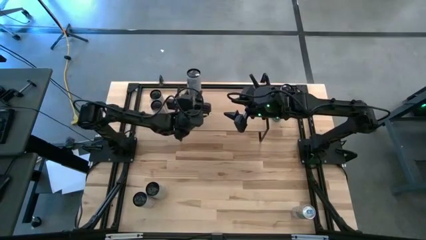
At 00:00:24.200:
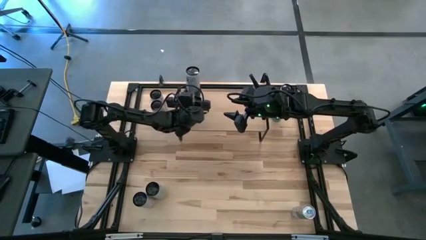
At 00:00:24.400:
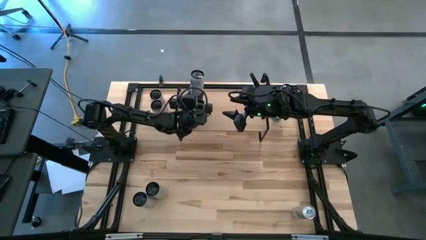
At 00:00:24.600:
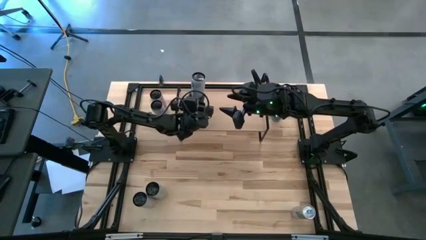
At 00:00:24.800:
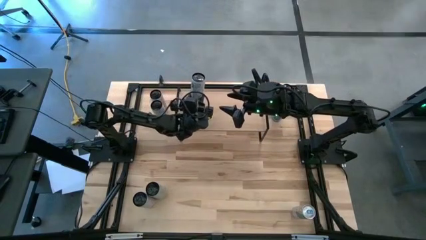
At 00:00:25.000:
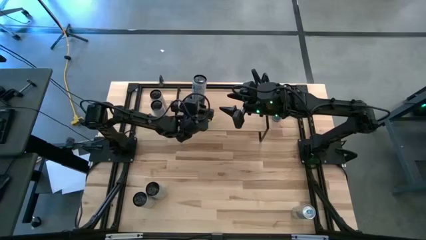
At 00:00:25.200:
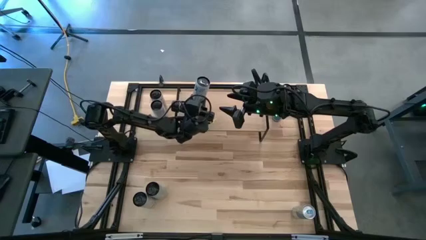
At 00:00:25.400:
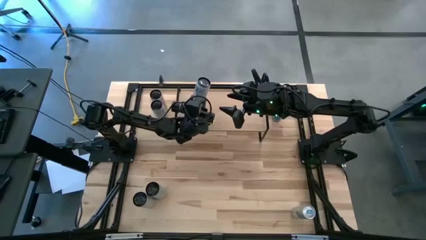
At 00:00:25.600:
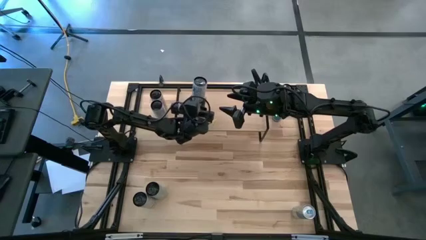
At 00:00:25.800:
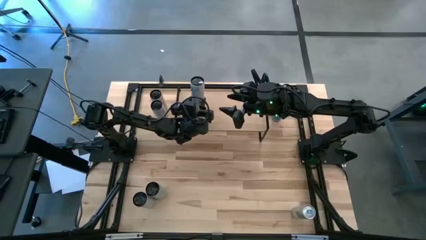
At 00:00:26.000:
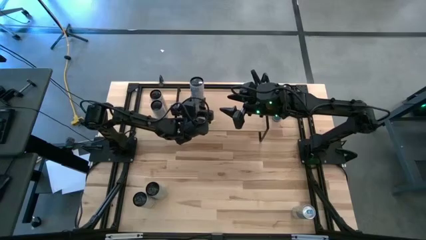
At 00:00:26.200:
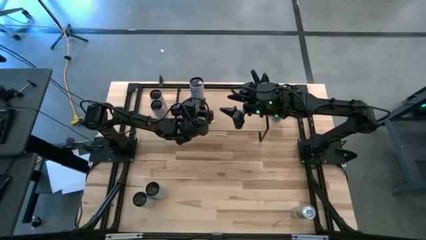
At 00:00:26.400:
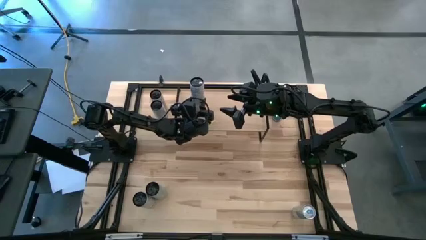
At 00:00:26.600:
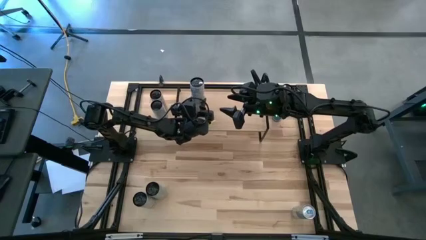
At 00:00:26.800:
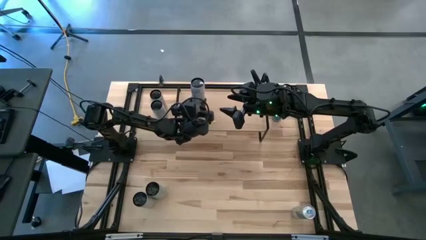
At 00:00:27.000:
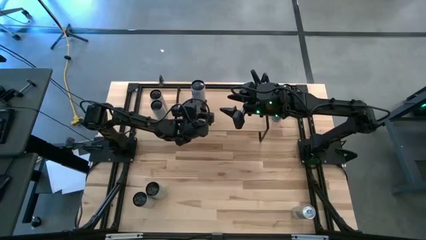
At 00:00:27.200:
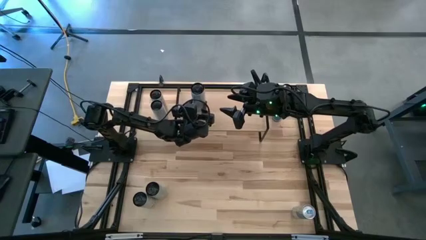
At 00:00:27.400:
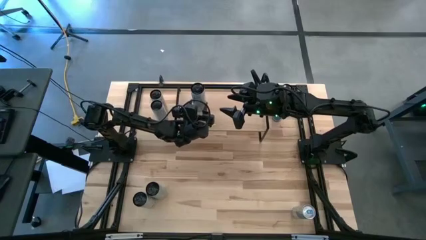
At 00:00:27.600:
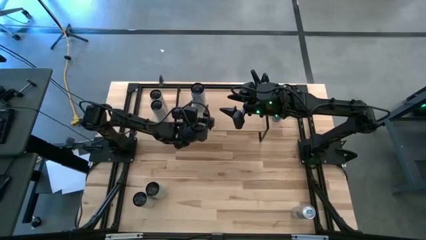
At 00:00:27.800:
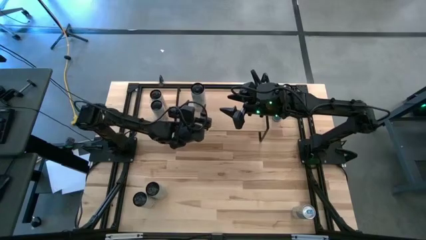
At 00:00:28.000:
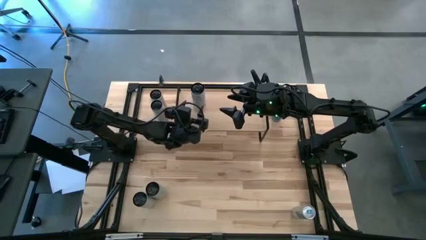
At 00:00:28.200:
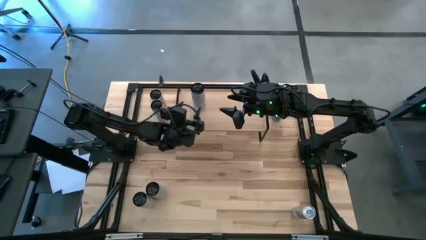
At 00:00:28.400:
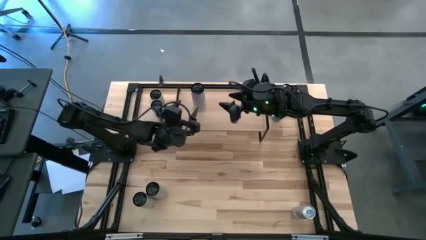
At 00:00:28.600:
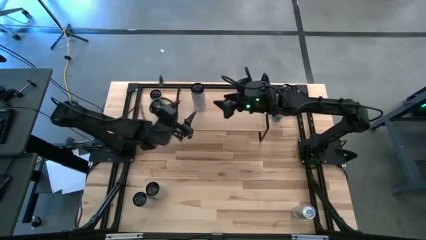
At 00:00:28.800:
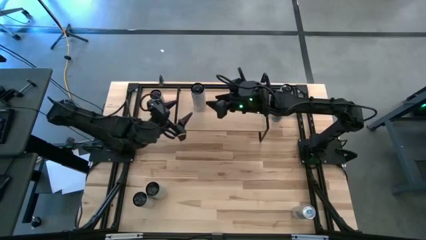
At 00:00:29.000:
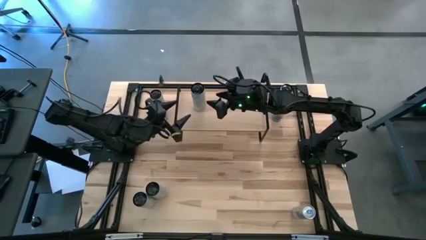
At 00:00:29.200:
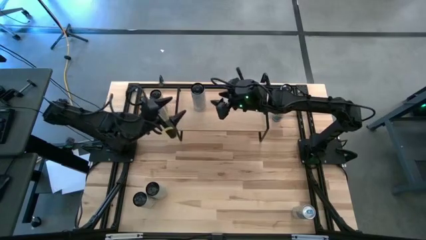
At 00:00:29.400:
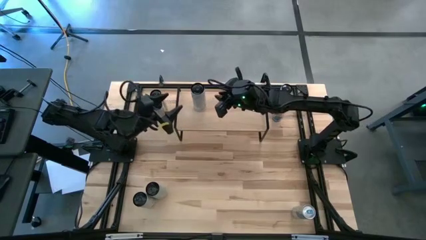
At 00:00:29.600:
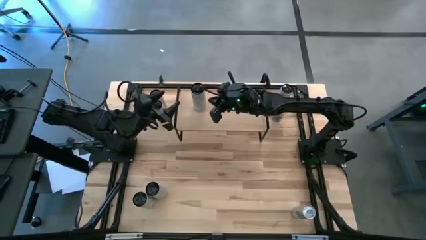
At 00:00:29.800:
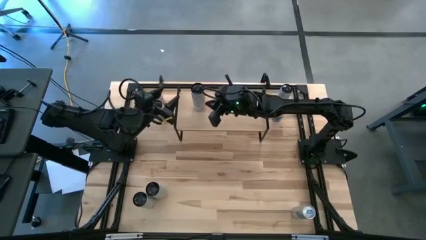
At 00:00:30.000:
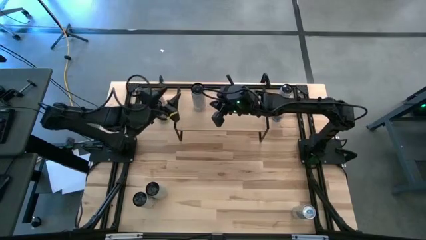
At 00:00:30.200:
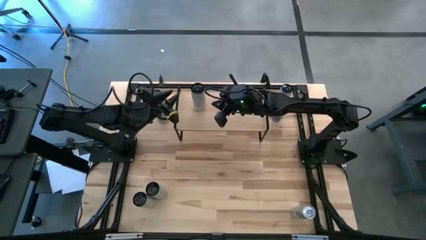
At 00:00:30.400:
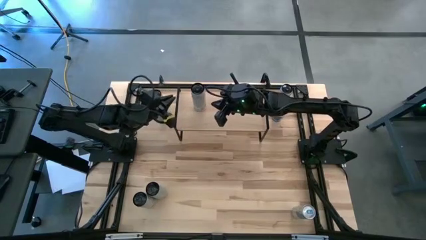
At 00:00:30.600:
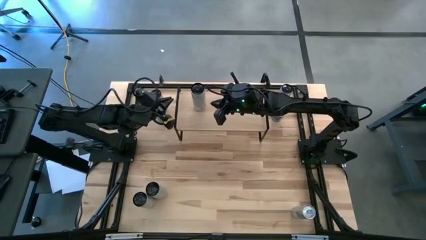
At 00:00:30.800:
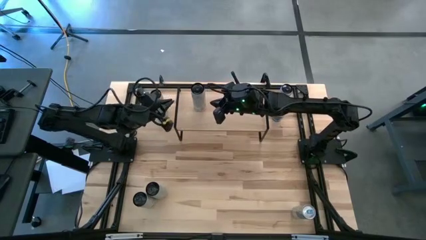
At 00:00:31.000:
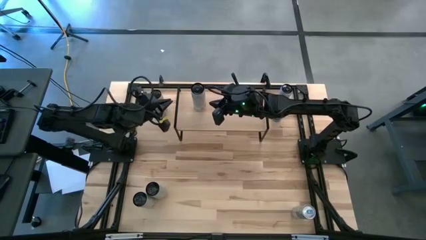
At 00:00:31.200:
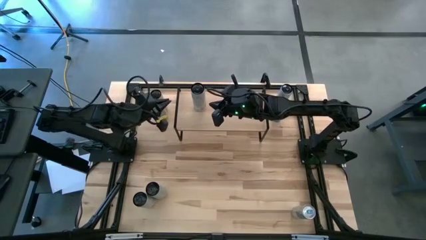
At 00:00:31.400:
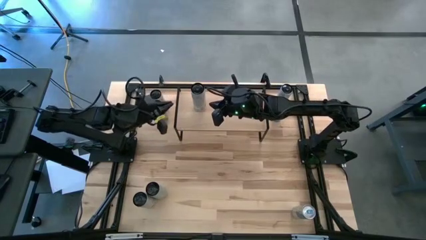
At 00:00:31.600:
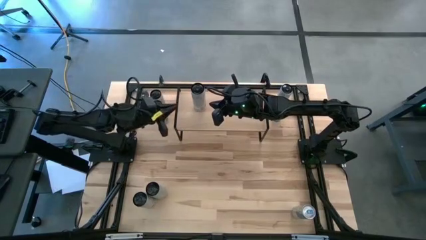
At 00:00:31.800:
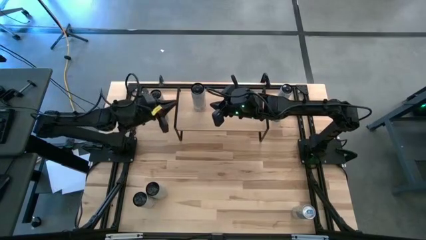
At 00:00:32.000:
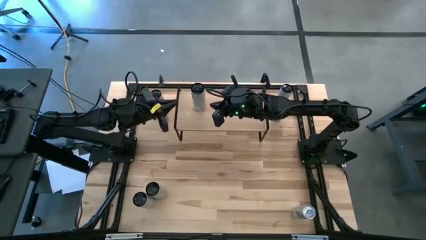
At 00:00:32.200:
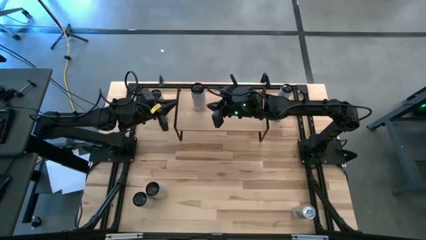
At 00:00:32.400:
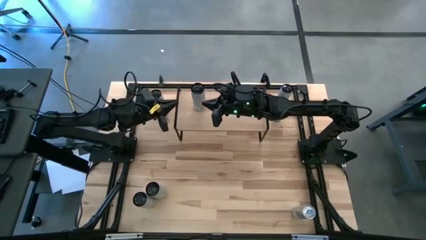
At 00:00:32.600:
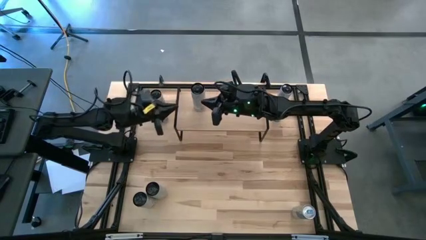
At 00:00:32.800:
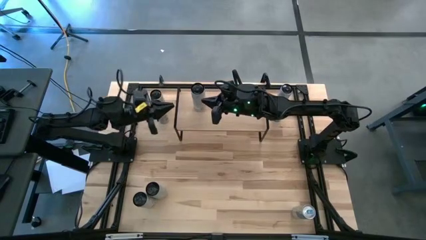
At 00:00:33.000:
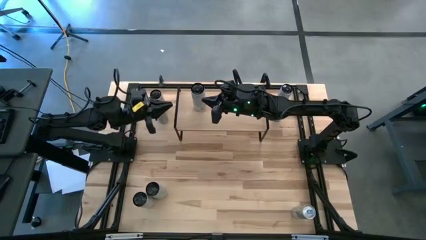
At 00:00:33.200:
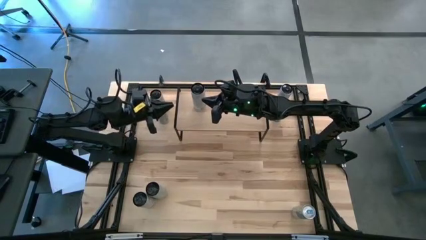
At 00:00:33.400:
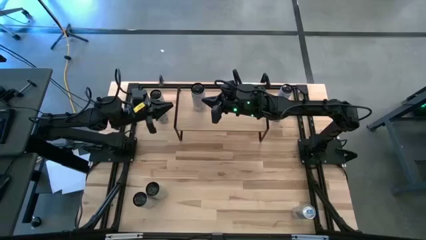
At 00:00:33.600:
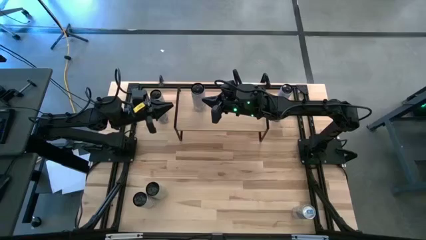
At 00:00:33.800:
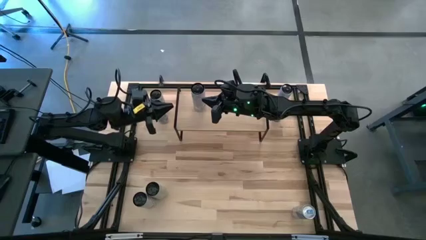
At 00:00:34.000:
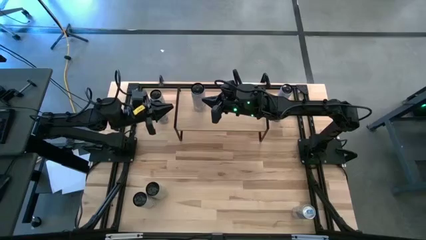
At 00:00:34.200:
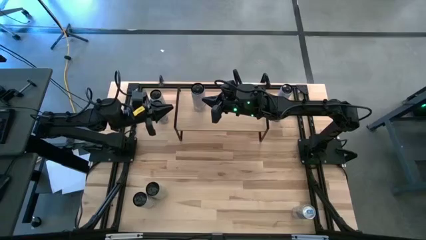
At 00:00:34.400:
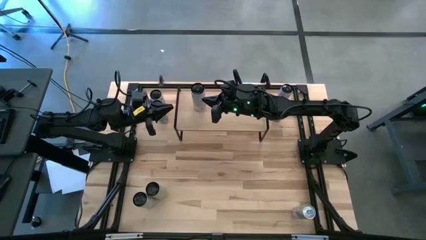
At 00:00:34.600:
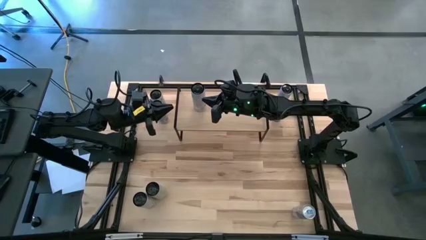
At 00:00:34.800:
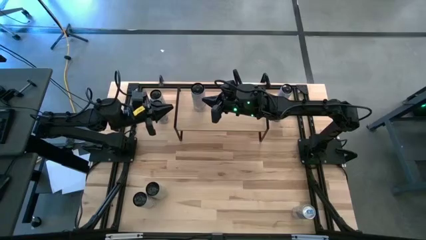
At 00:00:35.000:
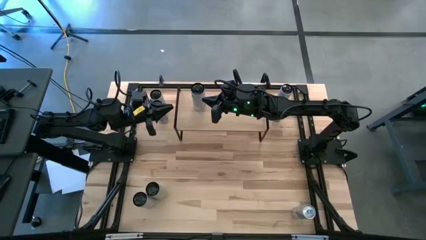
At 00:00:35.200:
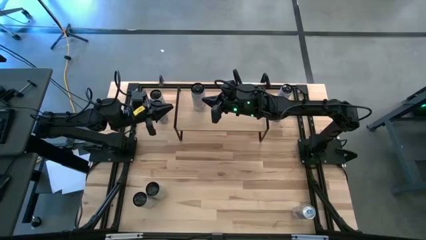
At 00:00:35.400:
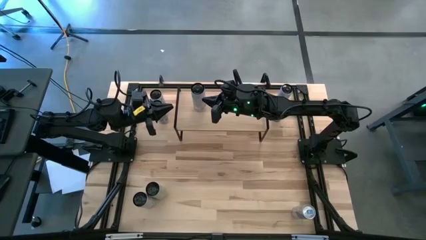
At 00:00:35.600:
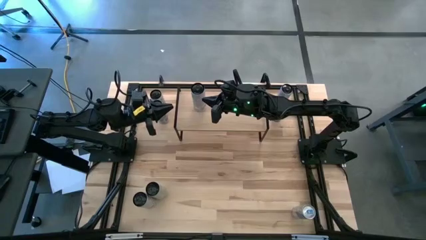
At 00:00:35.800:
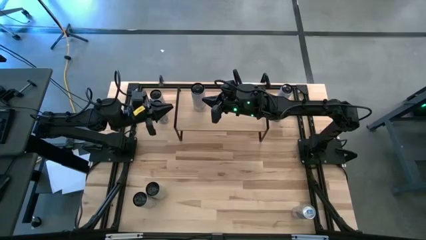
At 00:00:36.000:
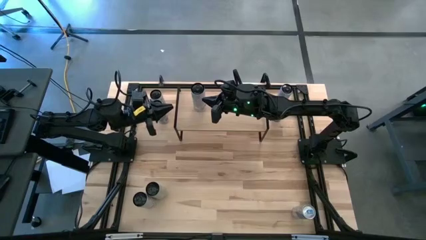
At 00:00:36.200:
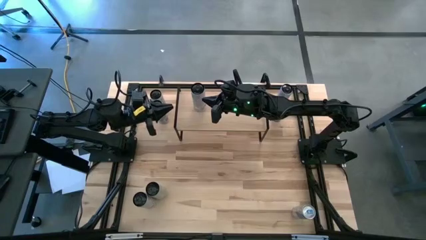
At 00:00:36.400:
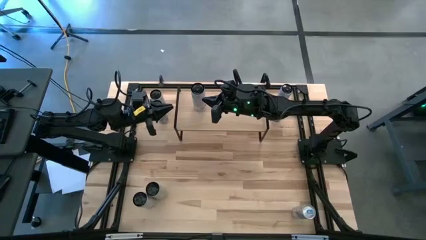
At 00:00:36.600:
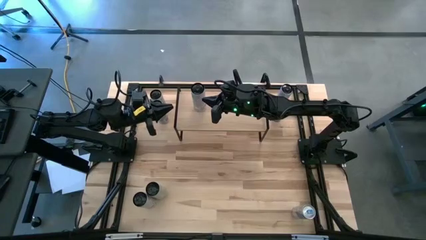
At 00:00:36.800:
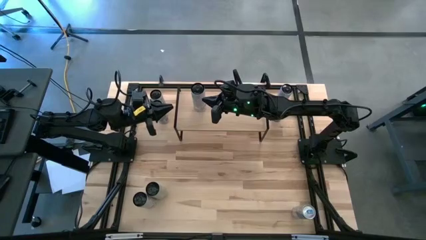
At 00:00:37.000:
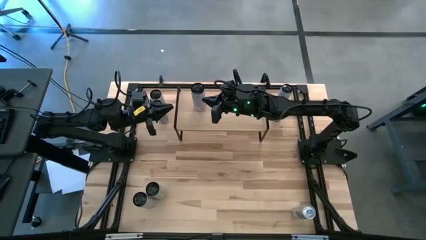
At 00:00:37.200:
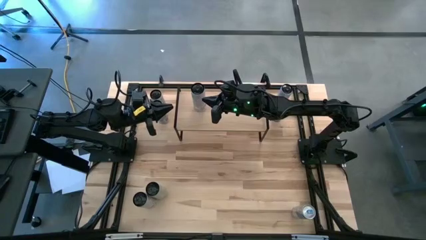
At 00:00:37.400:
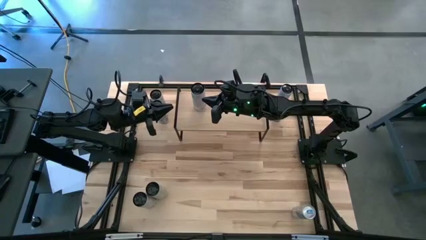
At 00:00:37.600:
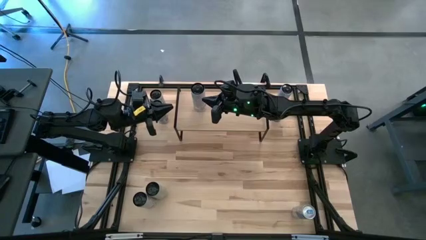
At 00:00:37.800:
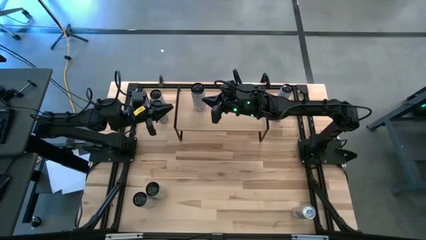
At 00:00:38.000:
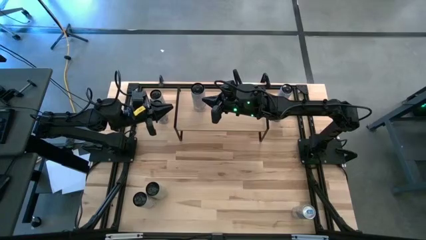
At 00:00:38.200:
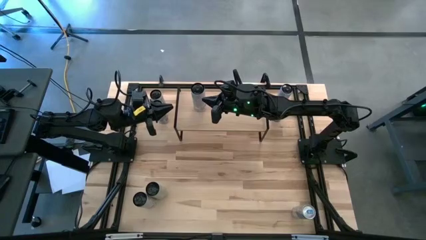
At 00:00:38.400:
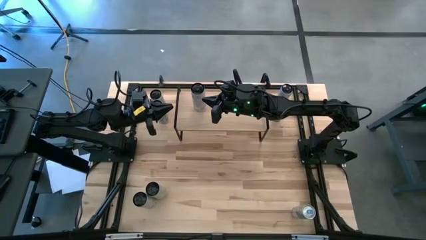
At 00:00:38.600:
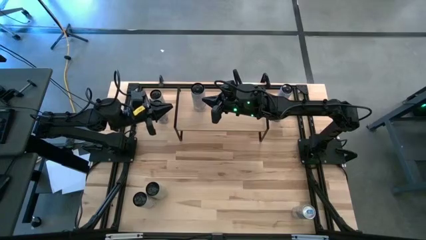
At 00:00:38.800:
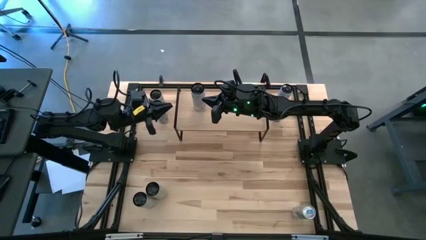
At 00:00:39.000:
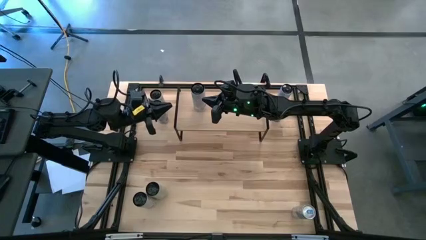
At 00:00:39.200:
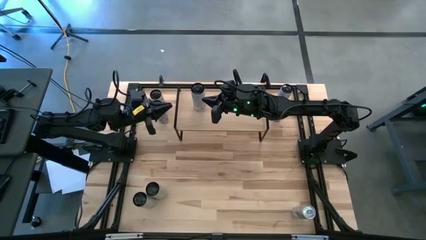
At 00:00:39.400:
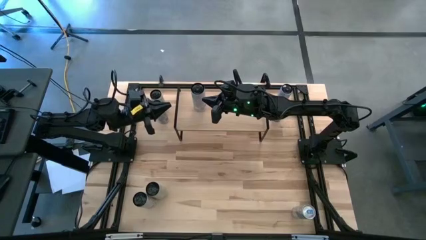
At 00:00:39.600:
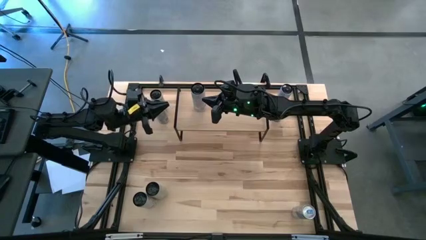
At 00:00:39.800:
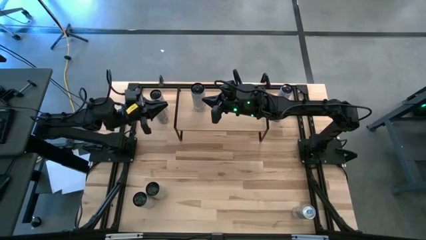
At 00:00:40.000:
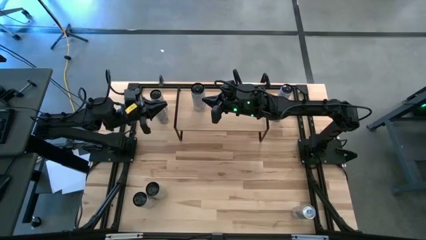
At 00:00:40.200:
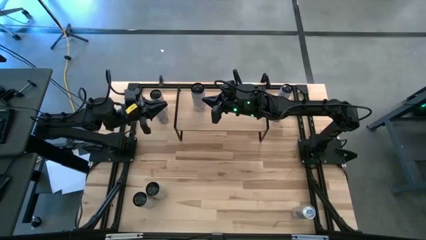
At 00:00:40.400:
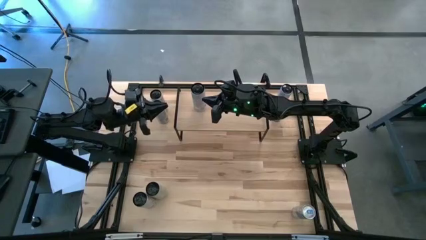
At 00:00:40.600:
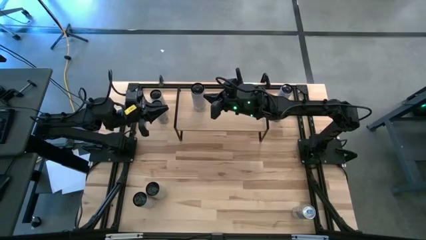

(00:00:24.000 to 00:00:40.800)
Task: Place canned beverage on shelf
Put the right white pink soda can on the shelf
